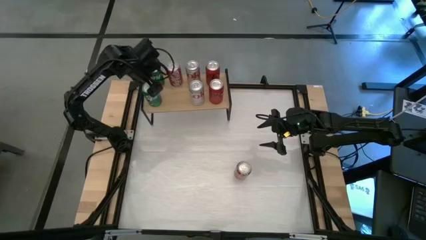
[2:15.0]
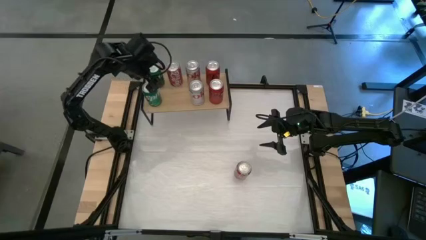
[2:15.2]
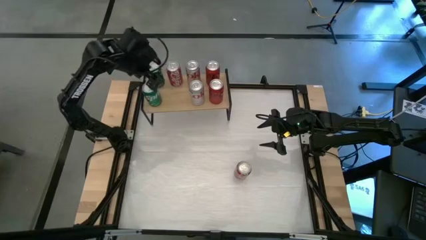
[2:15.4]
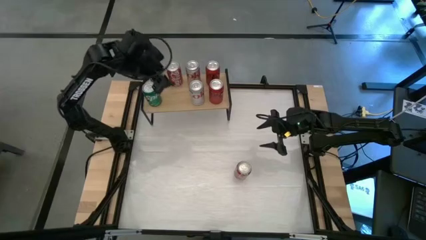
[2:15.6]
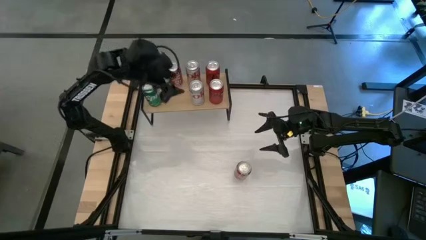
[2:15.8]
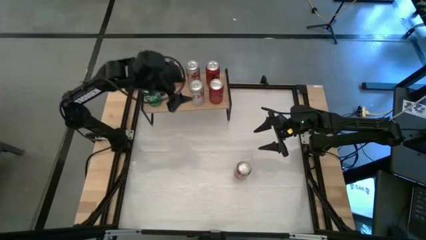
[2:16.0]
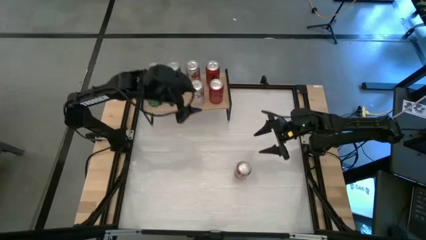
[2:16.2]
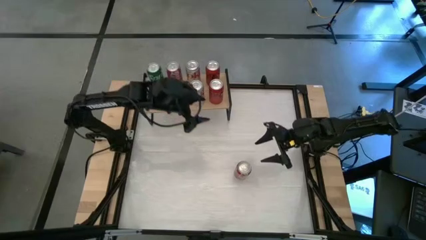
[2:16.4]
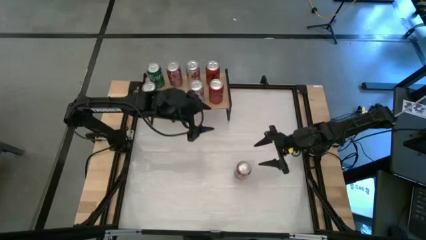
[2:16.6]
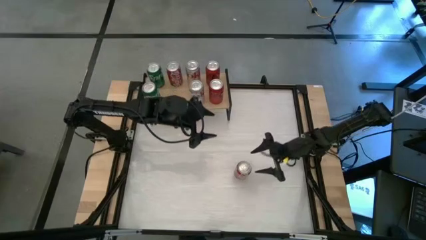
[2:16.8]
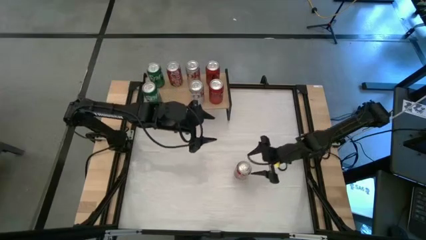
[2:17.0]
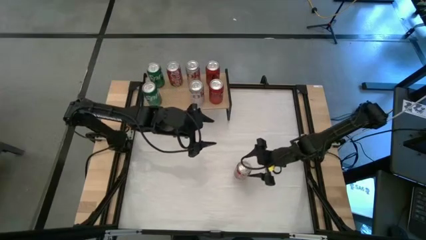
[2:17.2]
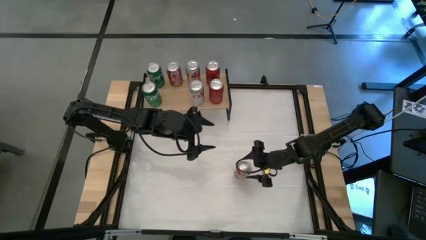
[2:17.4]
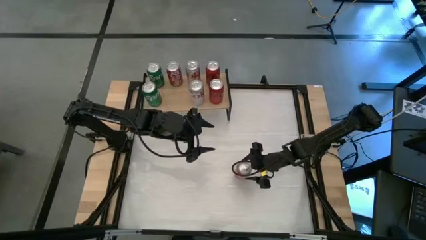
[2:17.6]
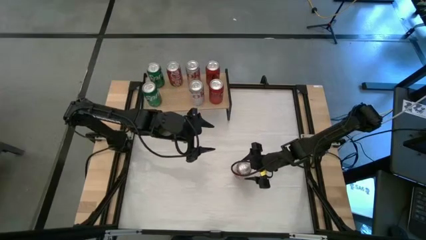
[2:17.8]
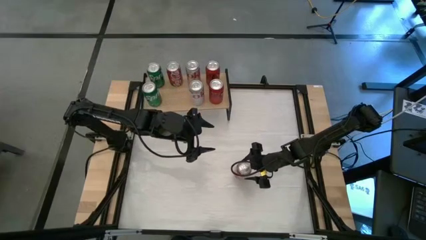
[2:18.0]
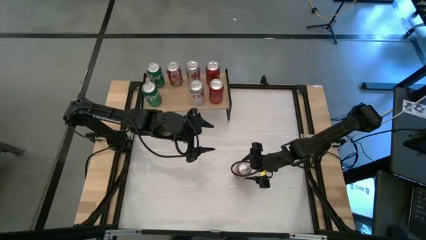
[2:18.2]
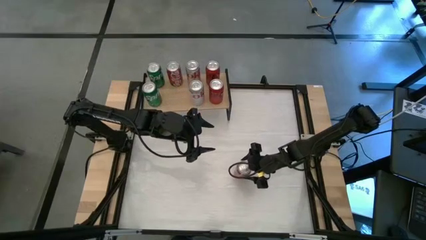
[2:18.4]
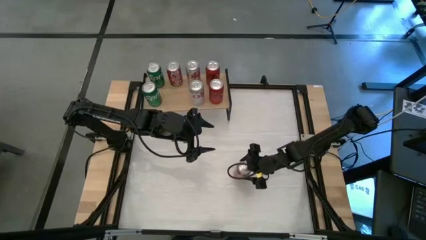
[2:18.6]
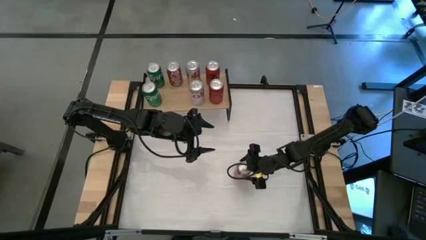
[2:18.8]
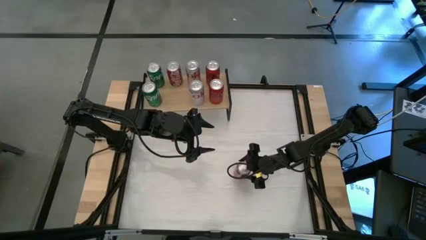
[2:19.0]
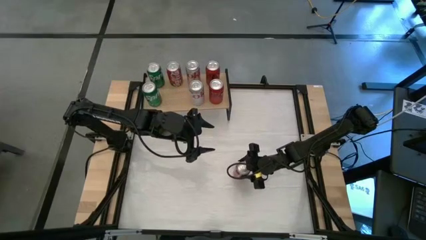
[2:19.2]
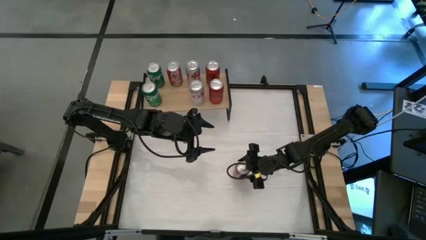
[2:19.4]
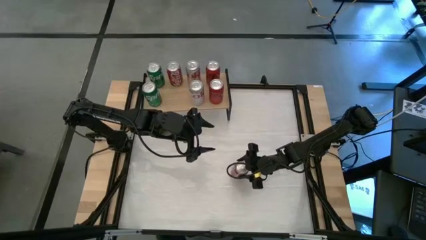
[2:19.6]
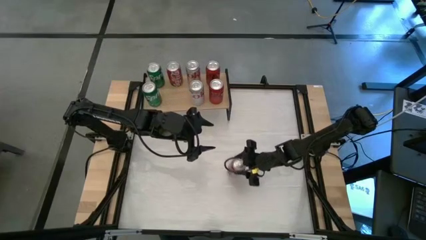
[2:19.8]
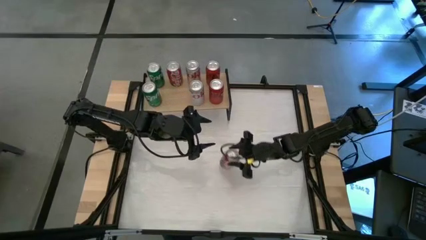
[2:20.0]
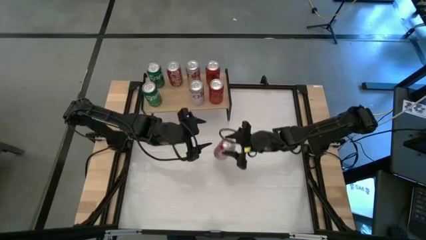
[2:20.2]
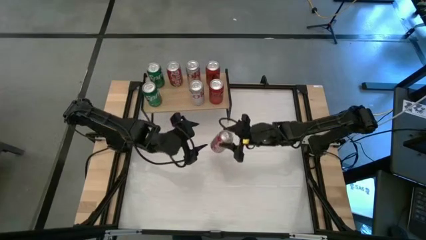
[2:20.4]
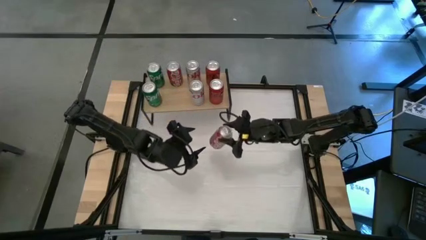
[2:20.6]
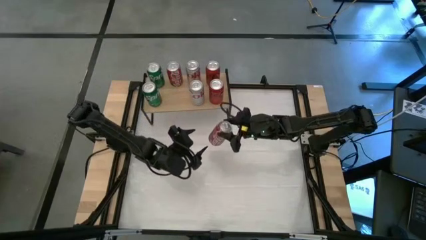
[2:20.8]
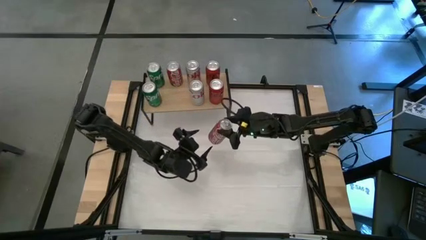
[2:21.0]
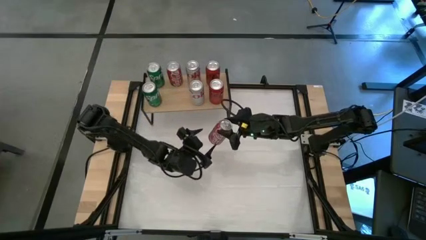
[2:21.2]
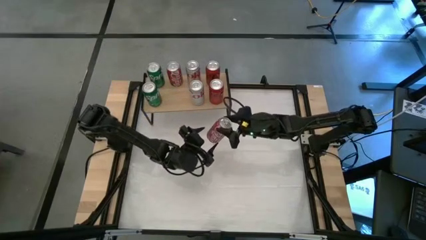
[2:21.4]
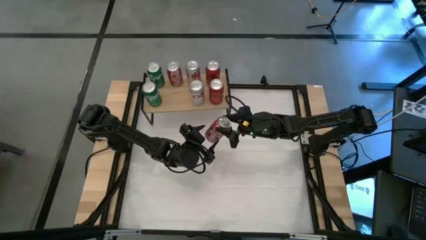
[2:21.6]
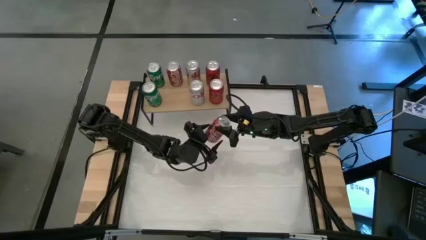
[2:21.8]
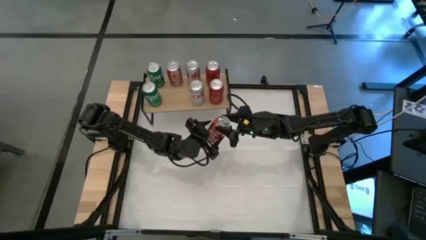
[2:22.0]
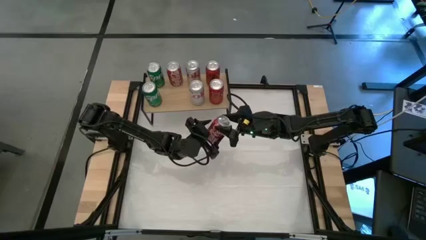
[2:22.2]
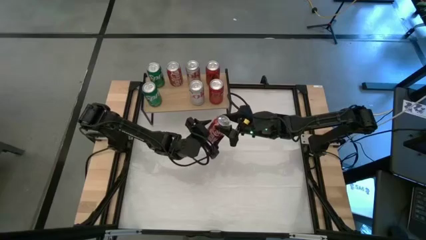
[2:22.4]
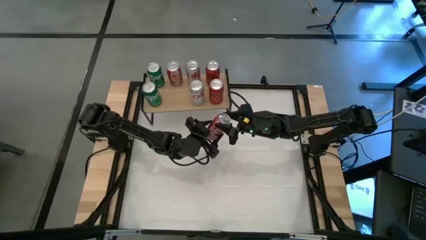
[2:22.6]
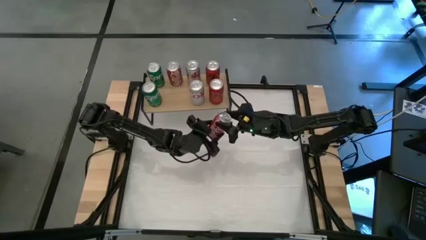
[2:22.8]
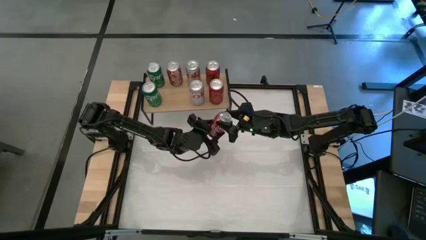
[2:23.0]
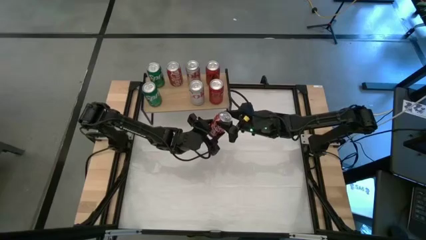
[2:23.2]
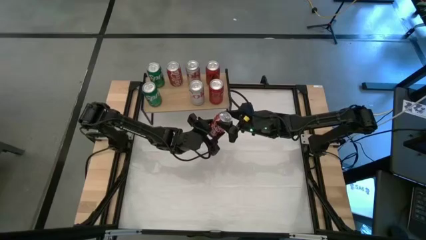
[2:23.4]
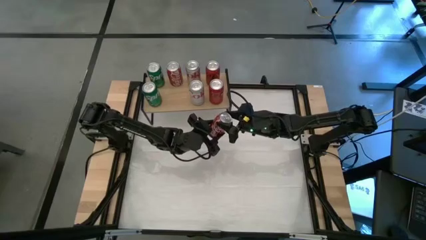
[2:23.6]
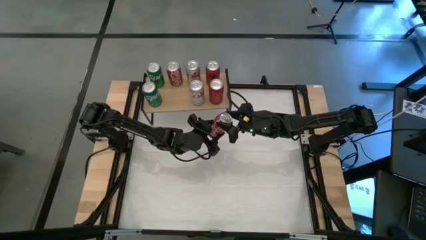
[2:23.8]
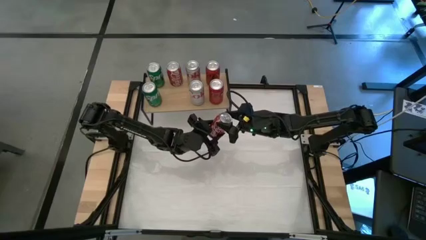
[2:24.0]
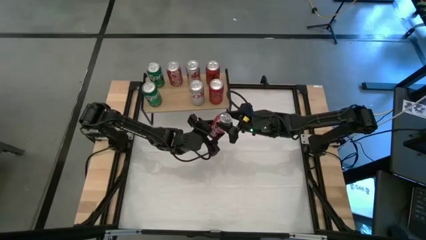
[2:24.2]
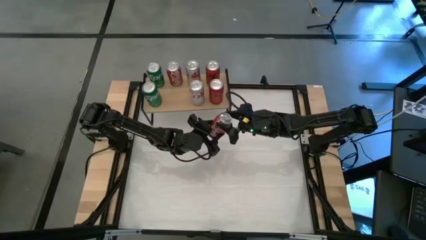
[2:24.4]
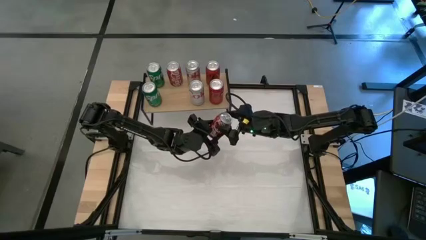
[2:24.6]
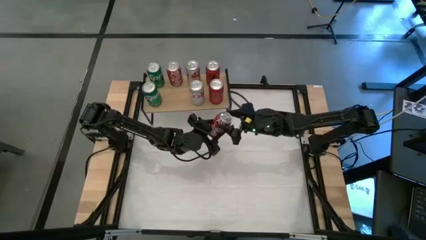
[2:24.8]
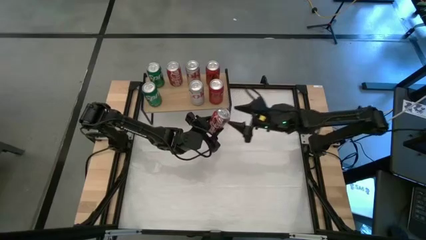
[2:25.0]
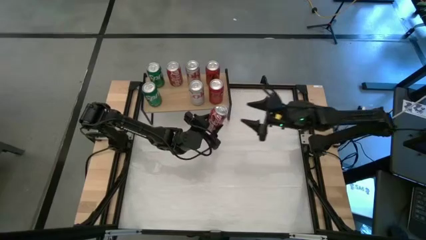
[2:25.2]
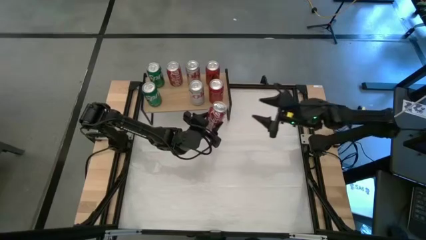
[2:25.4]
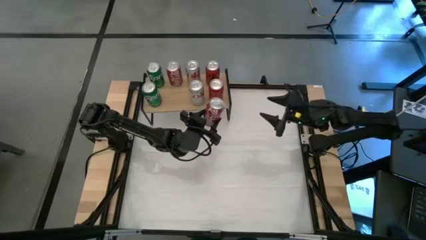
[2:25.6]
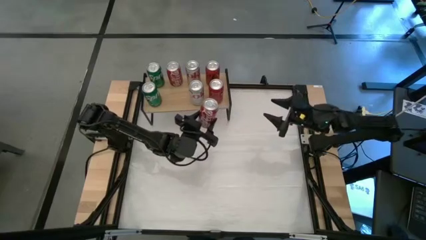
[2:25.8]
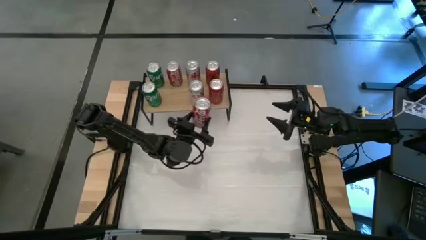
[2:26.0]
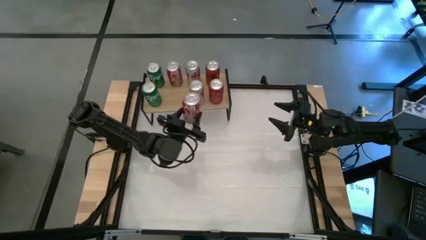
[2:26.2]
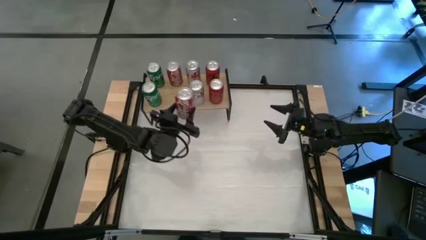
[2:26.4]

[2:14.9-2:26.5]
Task: Place canned beverage on shelf
Put the red white soda can on the shelf aligned with the other red white soda can
